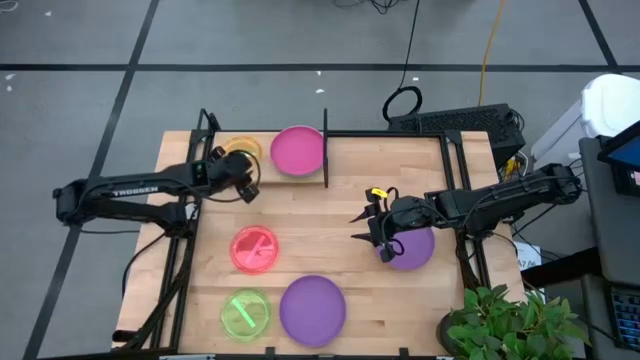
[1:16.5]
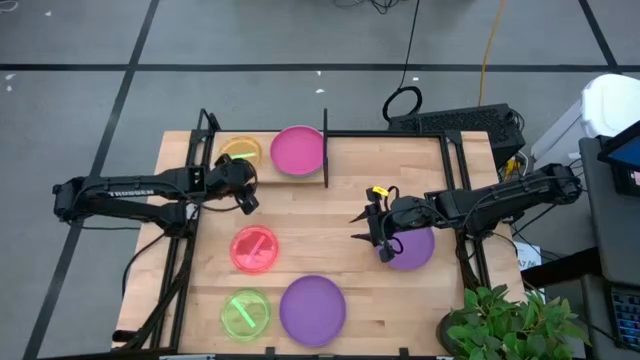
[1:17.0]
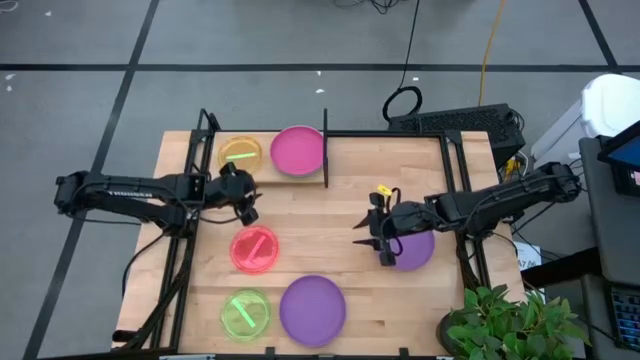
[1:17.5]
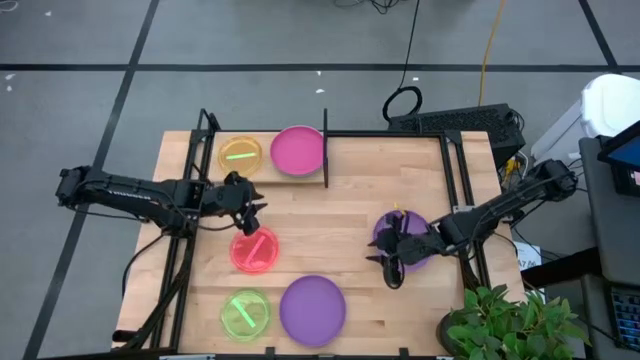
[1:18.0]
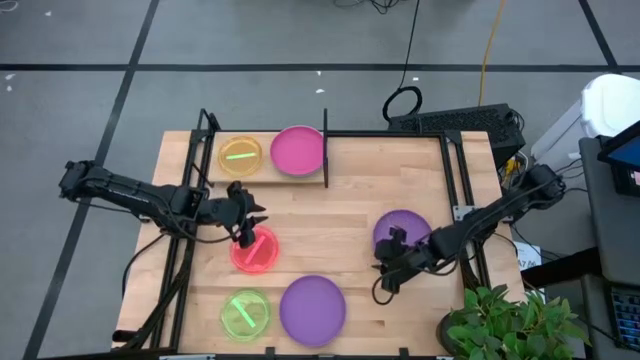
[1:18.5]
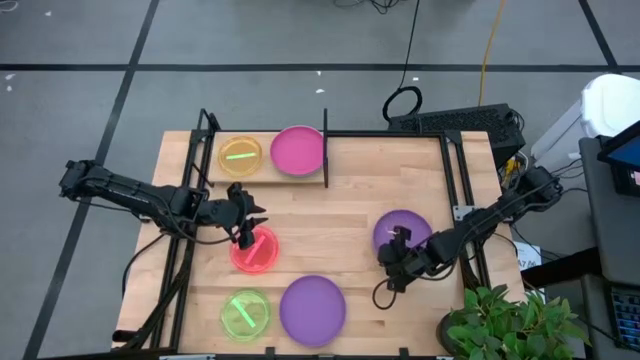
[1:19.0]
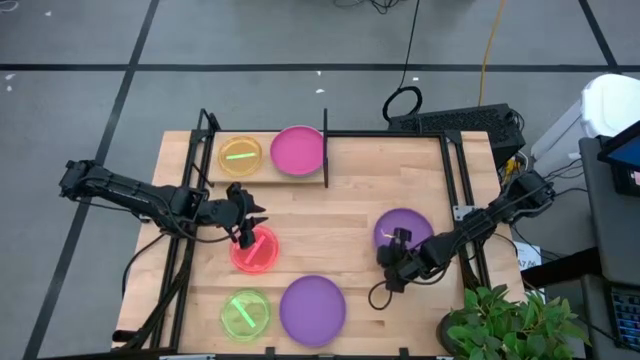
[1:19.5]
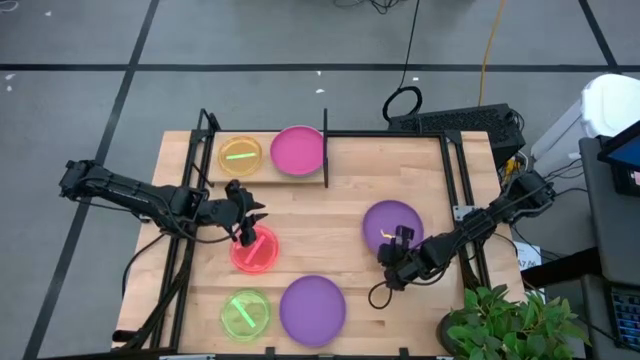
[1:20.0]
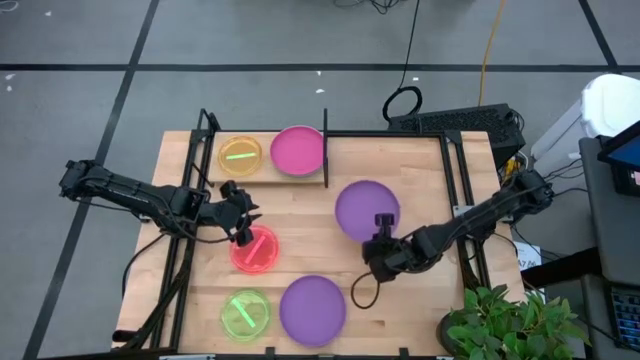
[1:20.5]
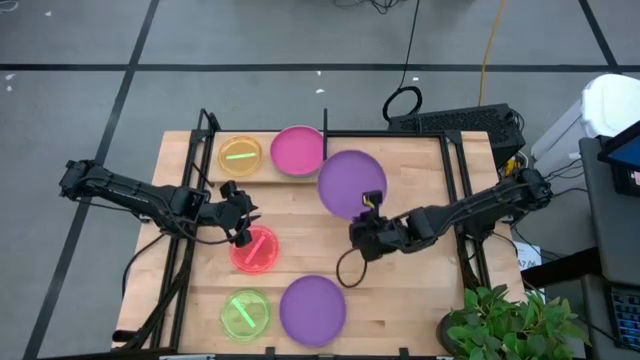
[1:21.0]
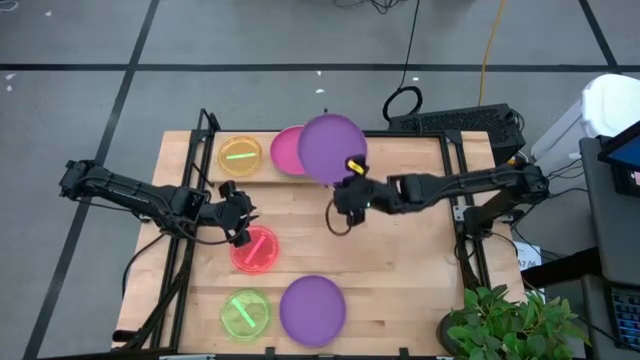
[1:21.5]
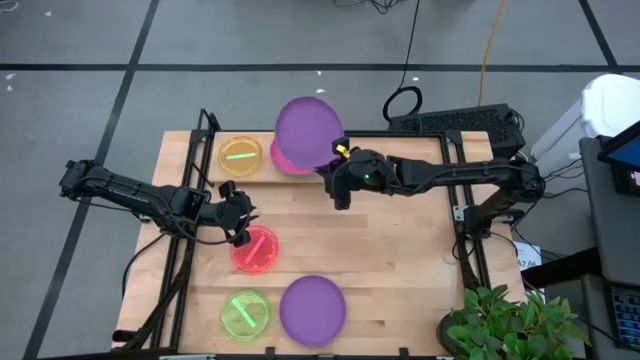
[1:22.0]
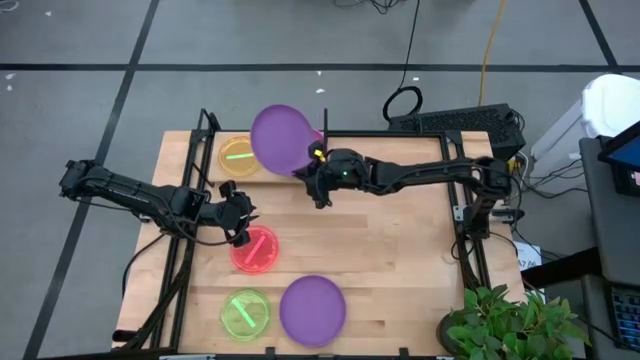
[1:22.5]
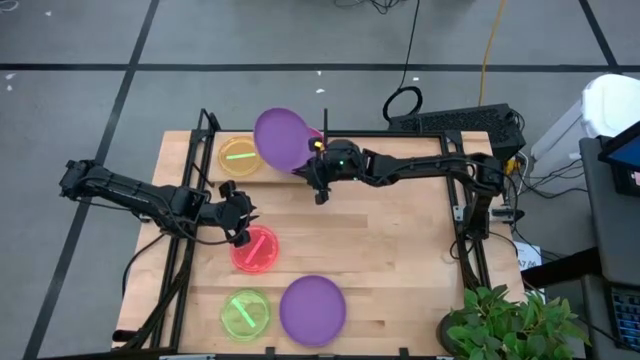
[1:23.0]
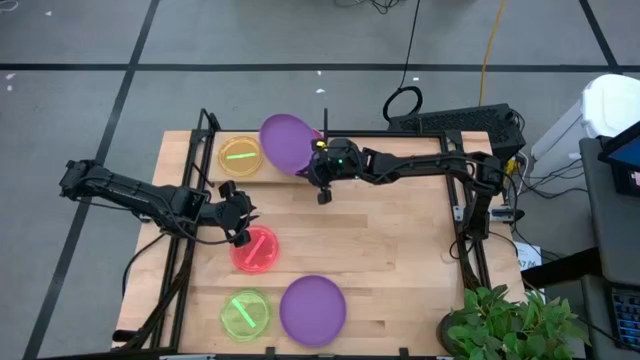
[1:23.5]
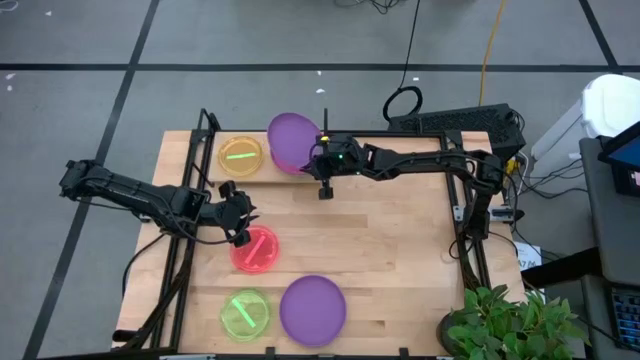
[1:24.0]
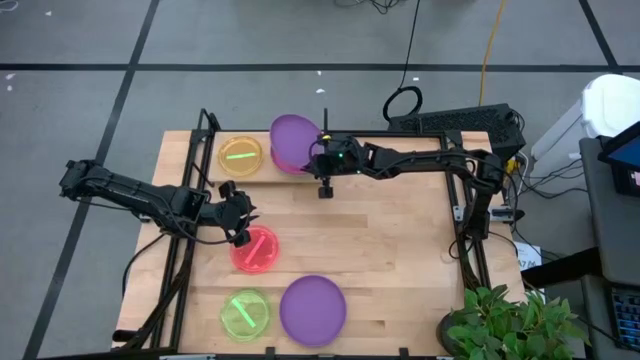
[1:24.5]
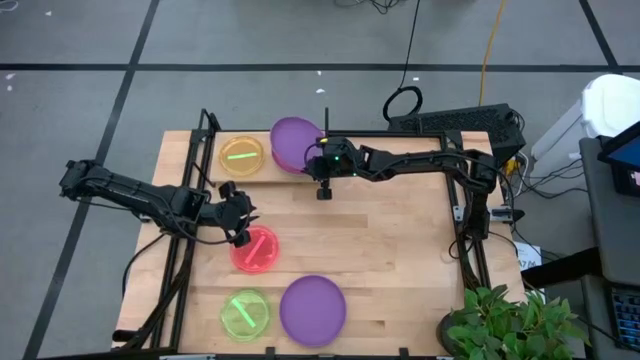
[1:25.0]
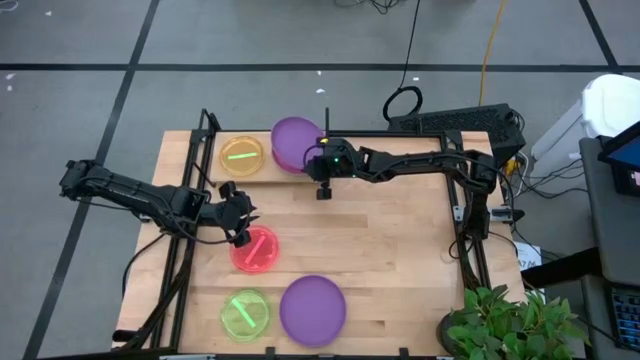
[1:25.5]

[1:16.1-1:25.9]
Task: Place and stack plates onto a shelf
Stack the top purple plate on the pink plate on the shelf

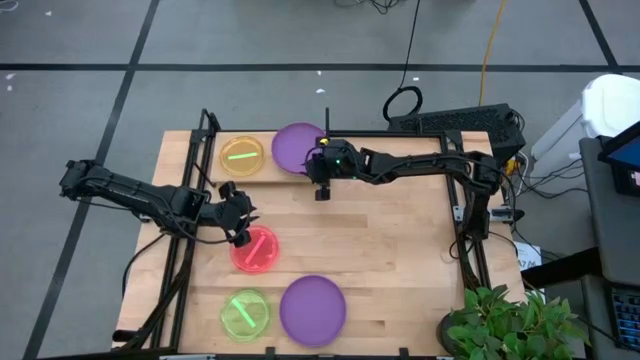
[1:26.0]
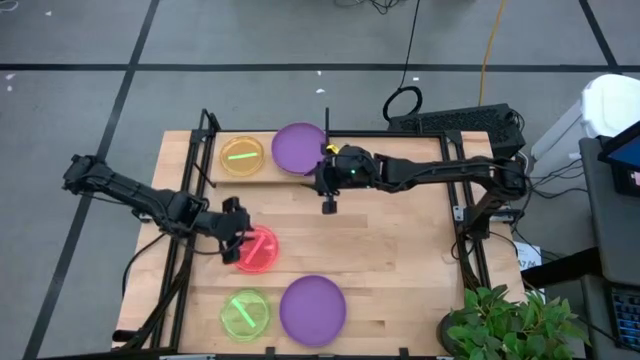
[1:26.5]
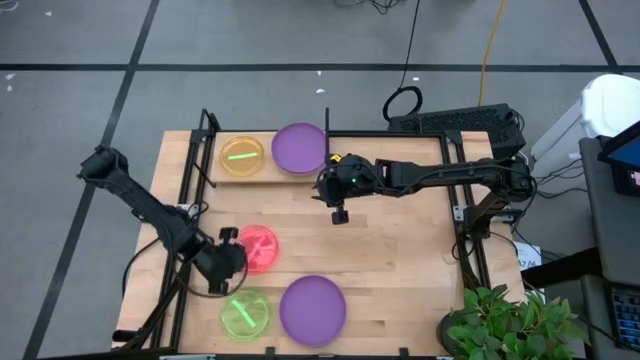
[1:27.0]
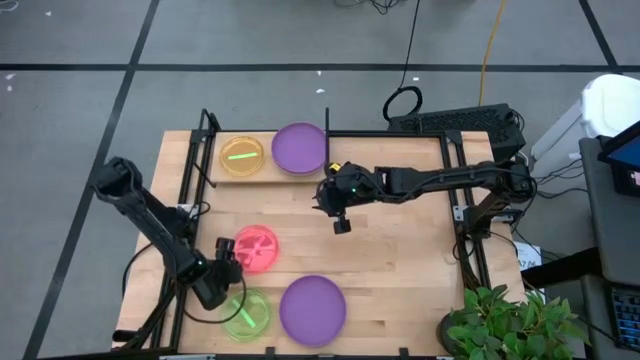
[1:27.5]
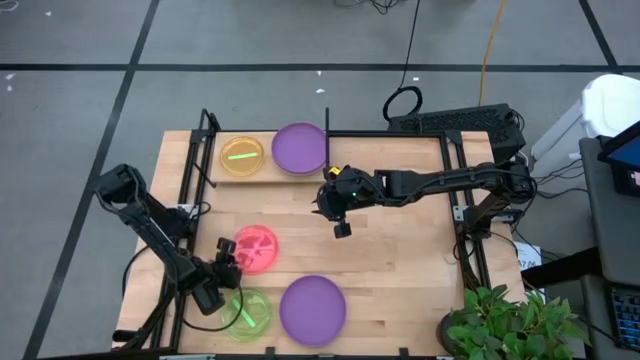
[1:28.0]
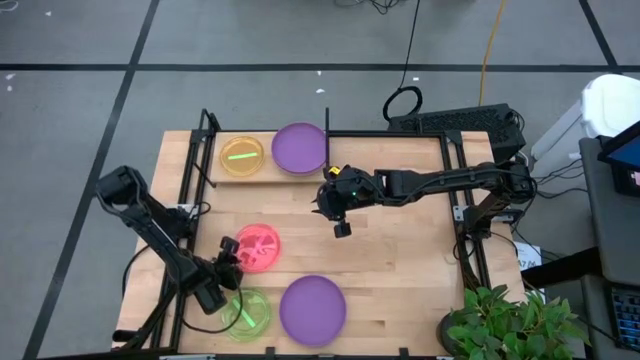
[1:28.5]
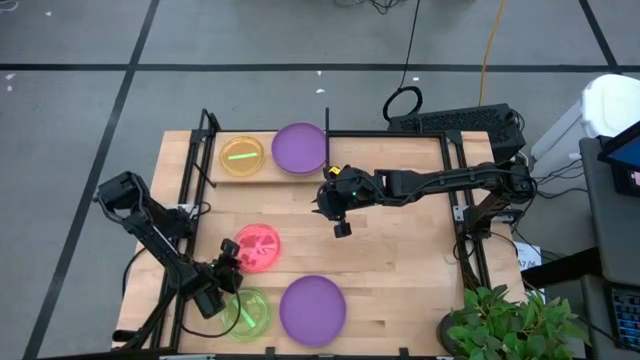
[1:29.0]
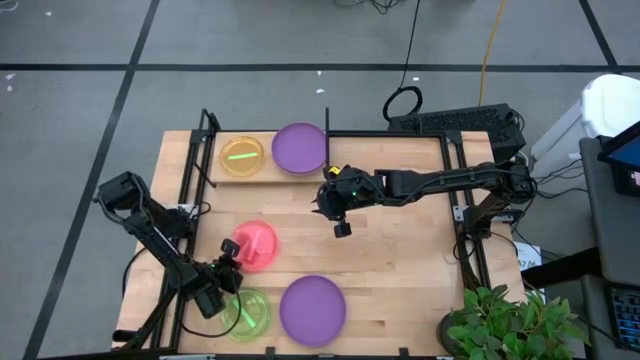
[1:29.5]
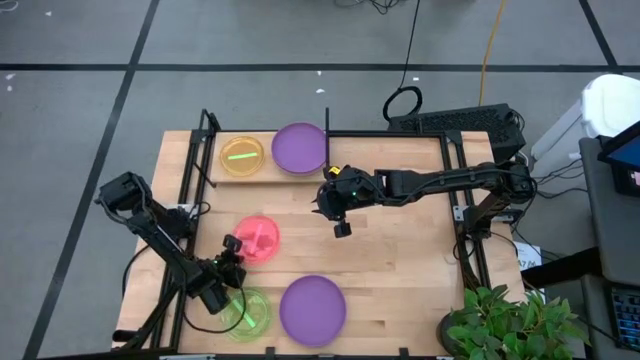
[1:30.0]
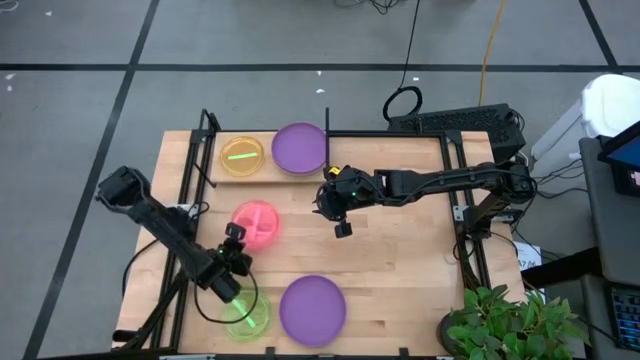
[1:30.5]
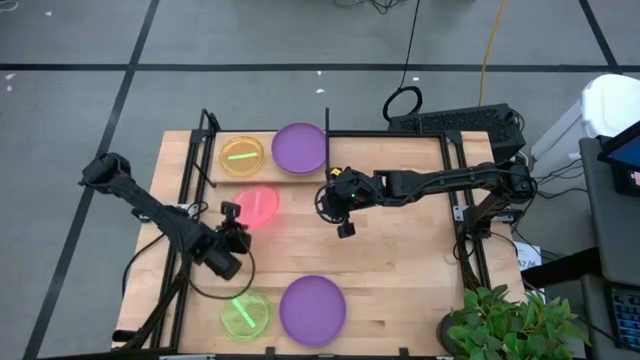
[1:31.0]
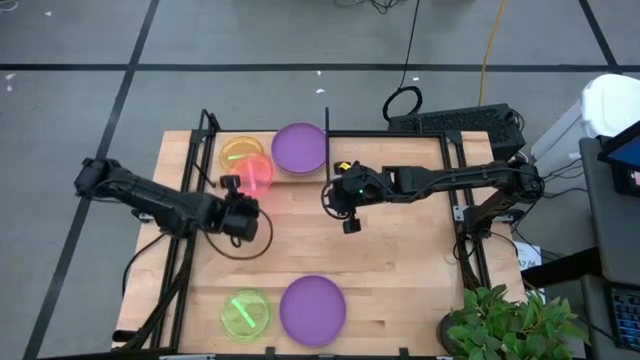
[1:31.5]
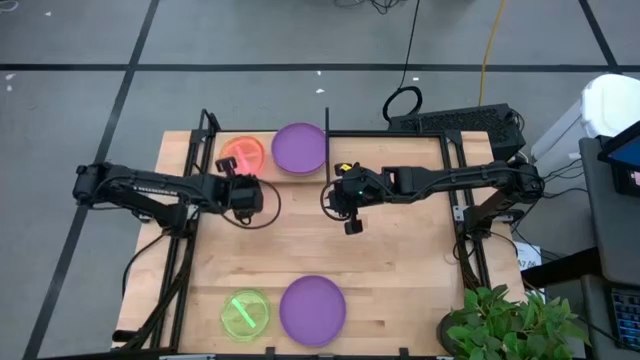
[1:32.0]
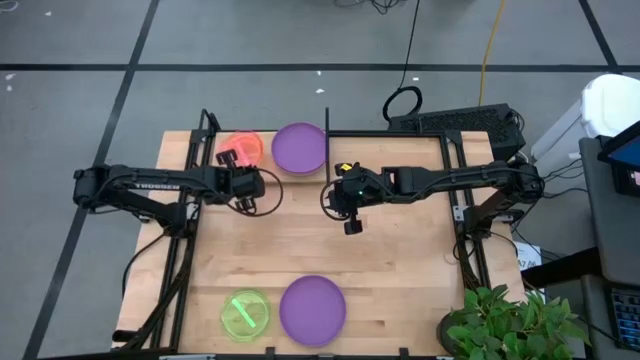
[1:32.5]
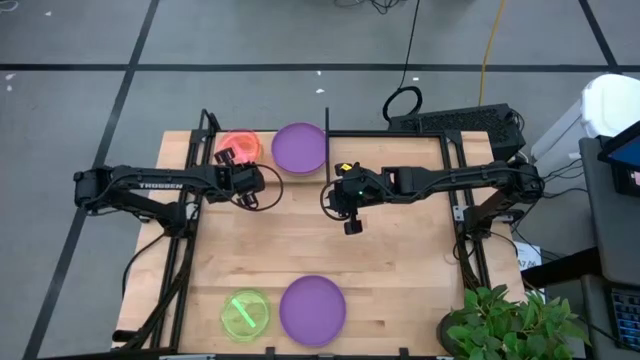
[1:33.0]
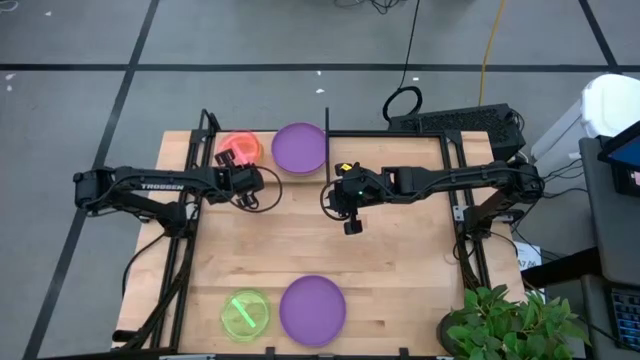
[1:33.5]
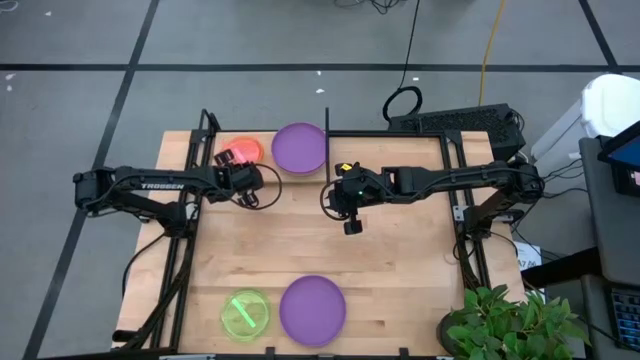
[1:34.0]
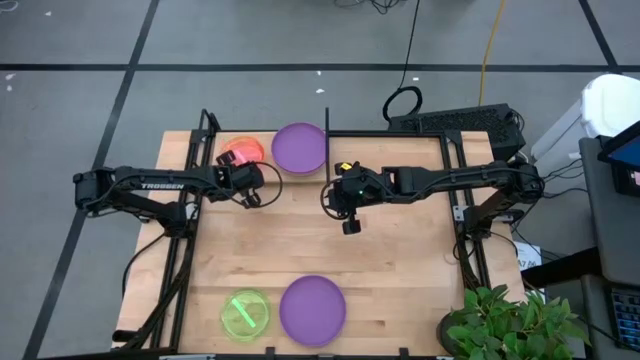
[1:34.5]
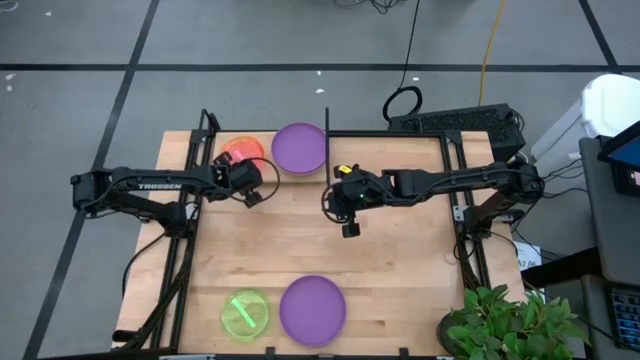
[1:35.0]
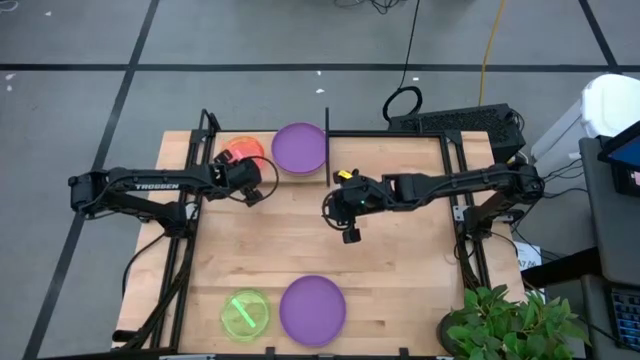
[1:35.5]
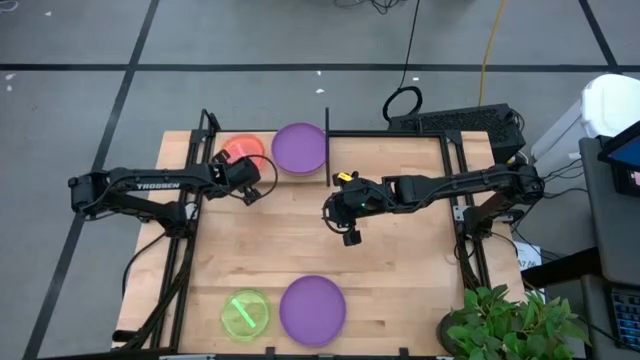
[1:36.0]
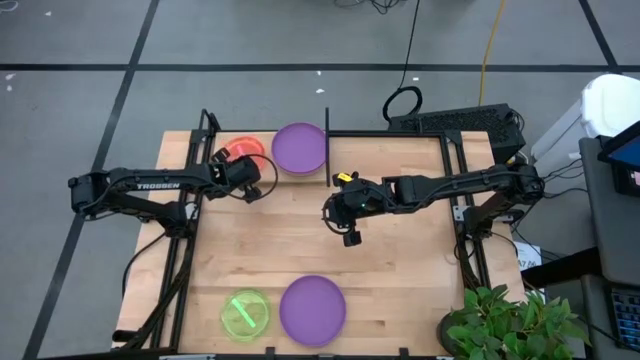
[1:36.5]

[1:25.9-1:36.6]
Stack the transparent red plate on the transparent green plate on the shelf

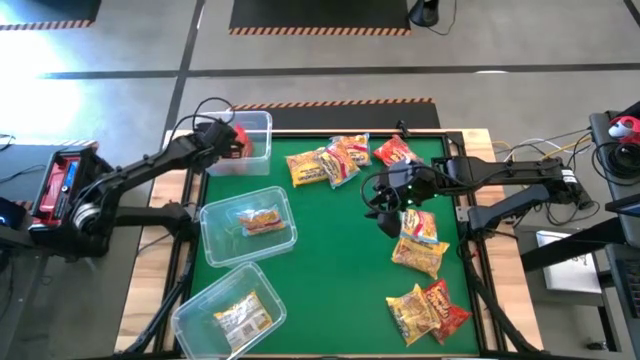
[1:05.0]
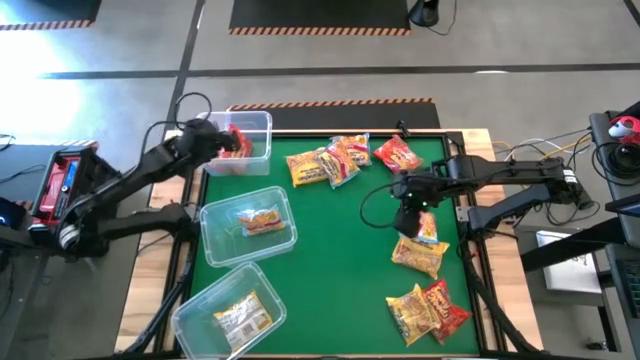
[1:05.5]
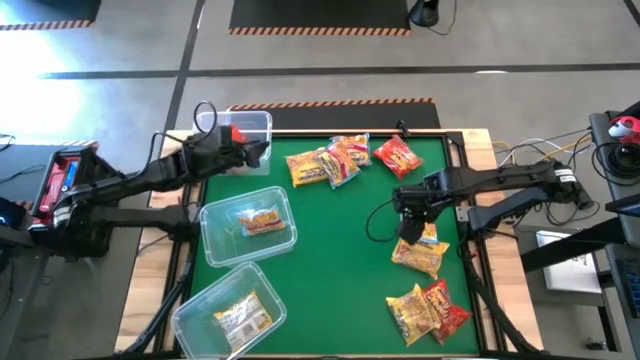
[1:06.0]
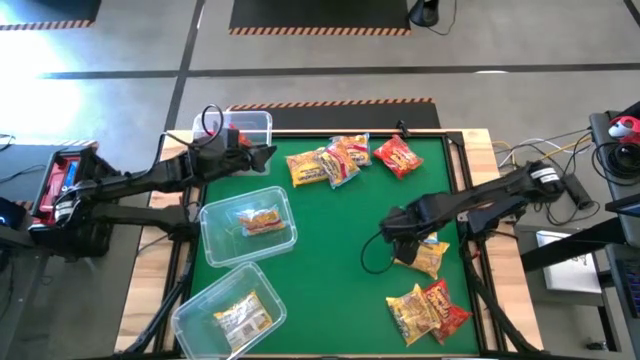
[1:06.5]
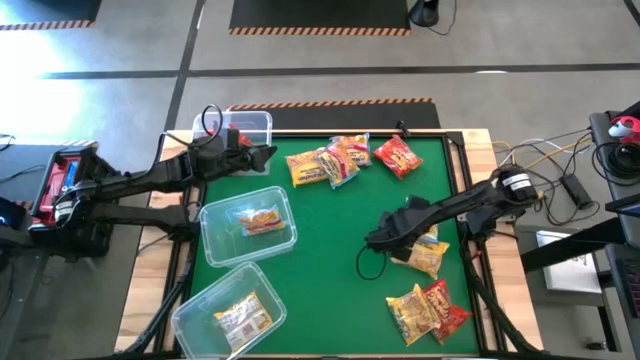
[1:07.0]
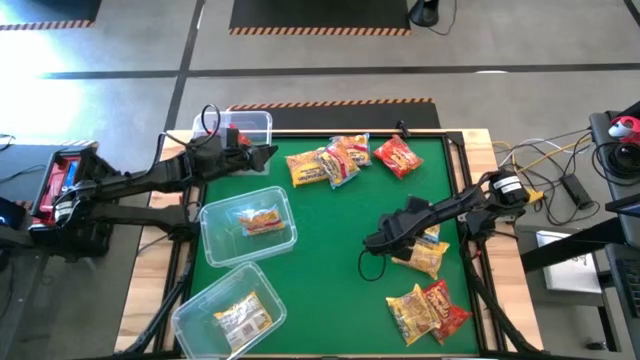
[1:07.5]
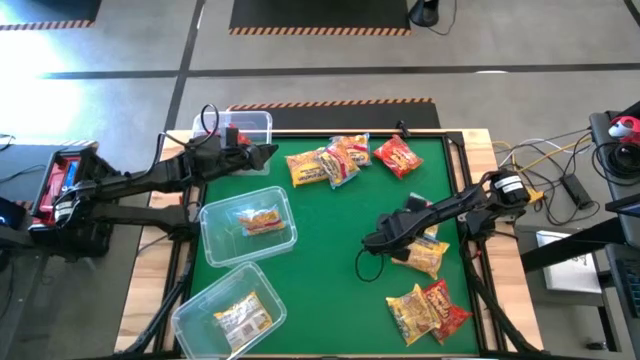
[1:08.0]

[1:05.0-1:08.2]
Task: Sort Maruchan noodles
Put the bottom right blue noodle pack into the middle transparent bin
